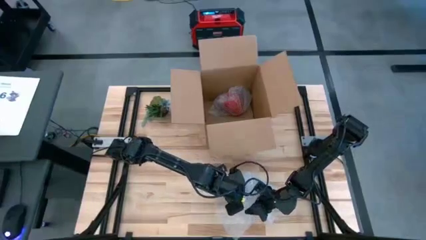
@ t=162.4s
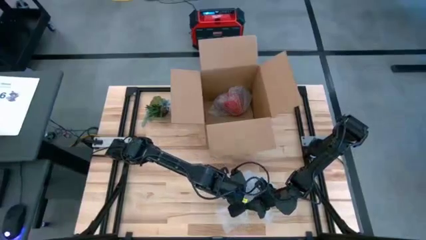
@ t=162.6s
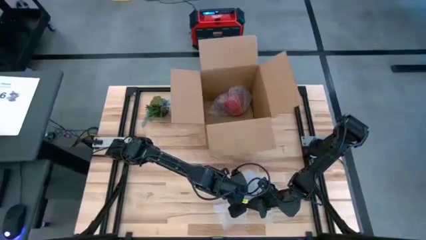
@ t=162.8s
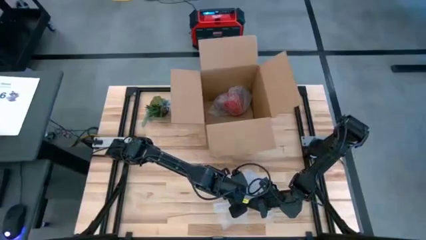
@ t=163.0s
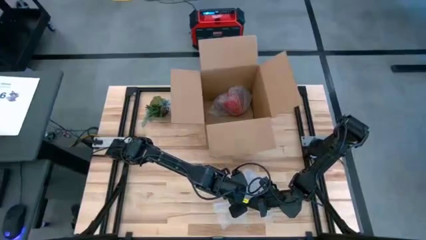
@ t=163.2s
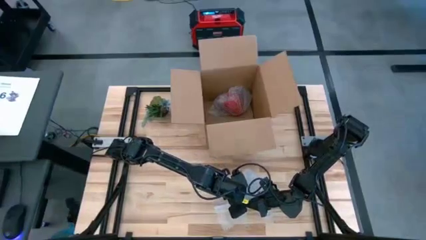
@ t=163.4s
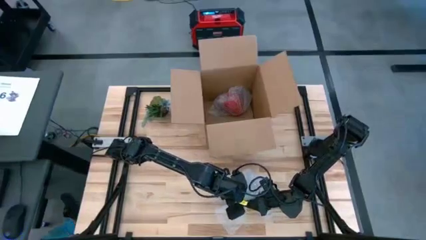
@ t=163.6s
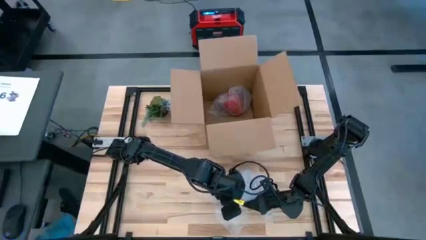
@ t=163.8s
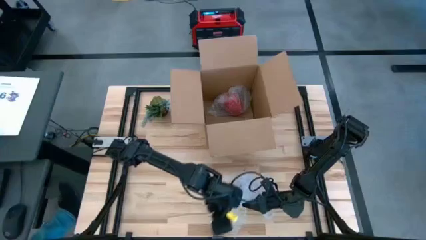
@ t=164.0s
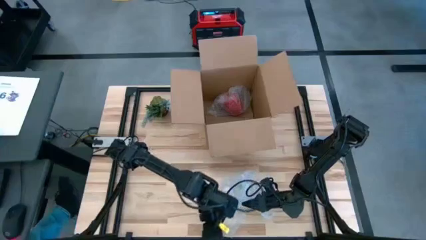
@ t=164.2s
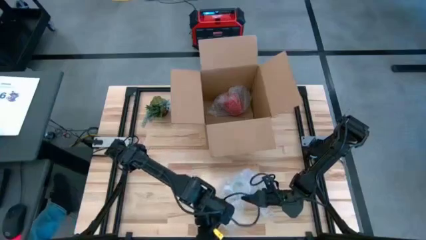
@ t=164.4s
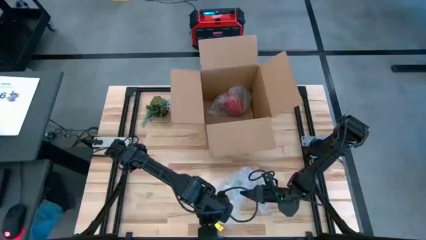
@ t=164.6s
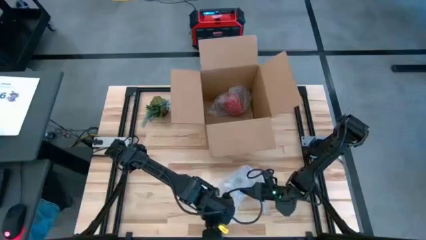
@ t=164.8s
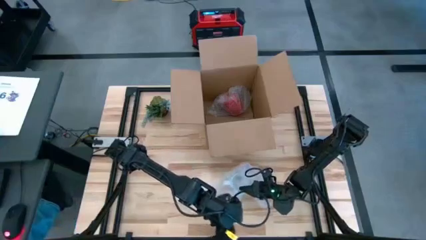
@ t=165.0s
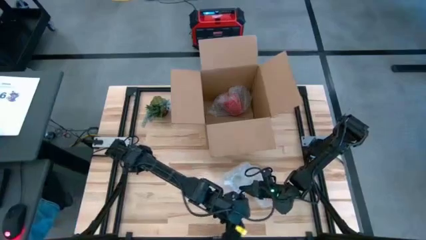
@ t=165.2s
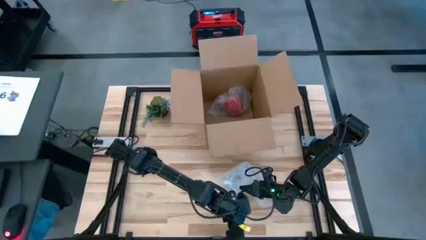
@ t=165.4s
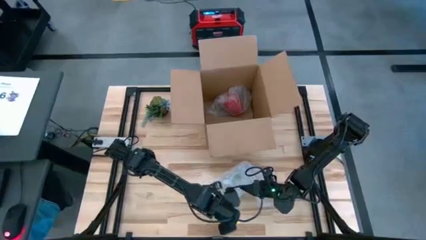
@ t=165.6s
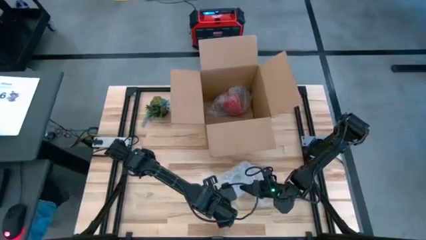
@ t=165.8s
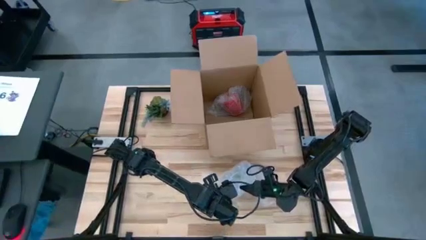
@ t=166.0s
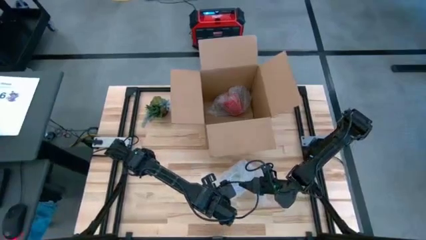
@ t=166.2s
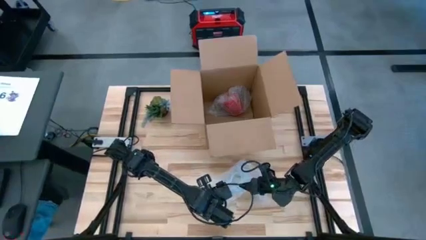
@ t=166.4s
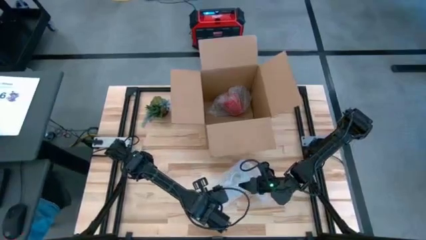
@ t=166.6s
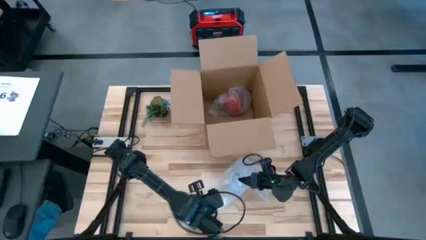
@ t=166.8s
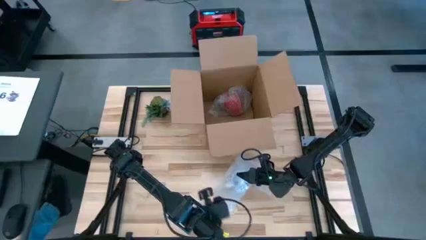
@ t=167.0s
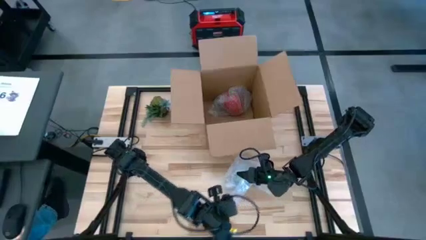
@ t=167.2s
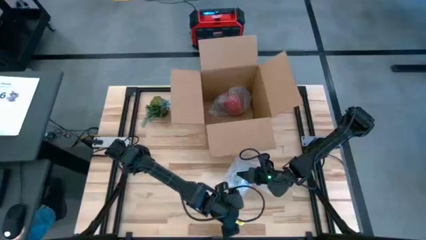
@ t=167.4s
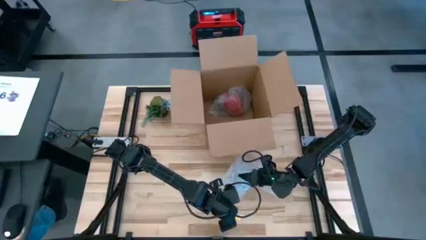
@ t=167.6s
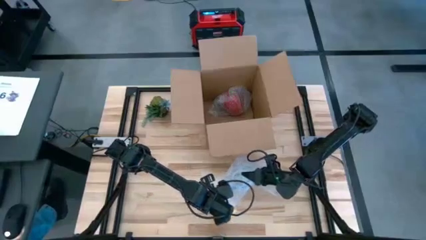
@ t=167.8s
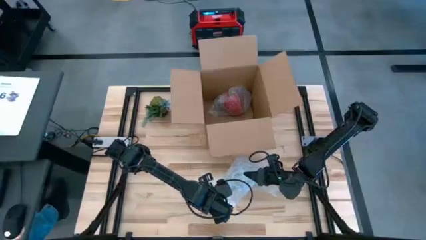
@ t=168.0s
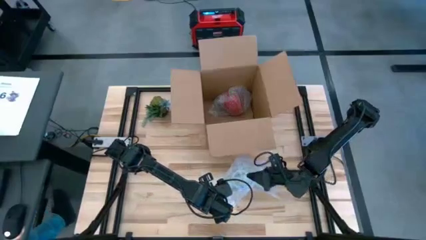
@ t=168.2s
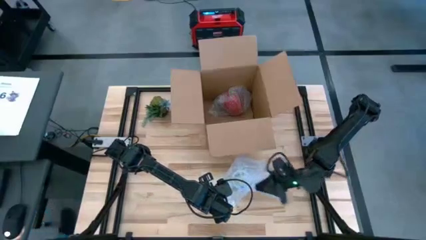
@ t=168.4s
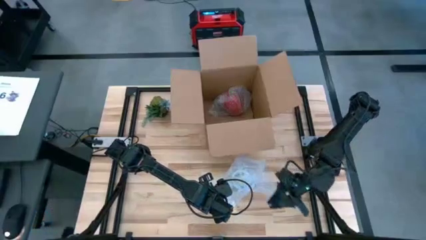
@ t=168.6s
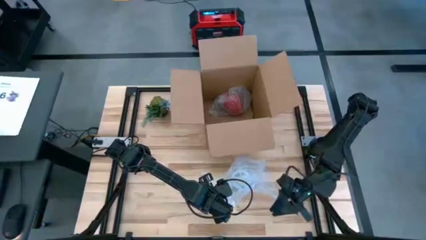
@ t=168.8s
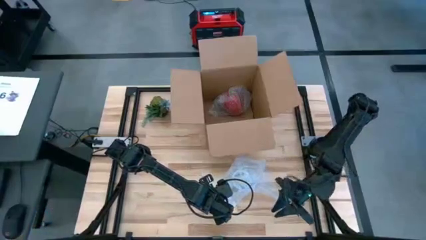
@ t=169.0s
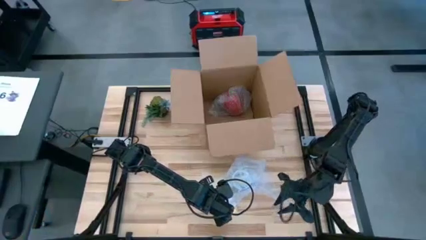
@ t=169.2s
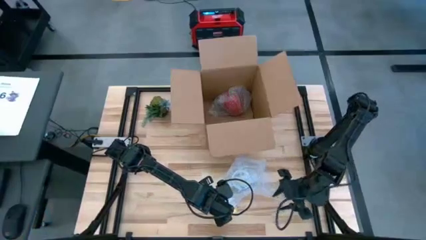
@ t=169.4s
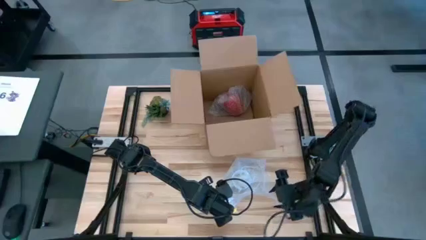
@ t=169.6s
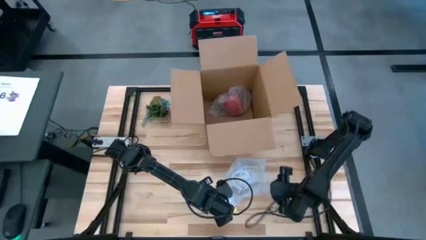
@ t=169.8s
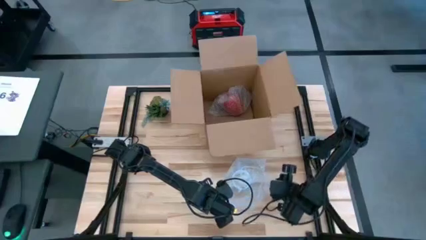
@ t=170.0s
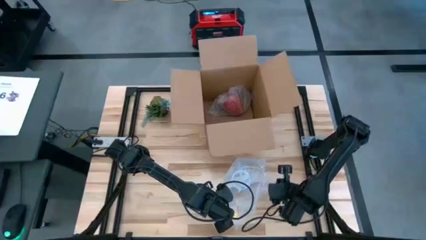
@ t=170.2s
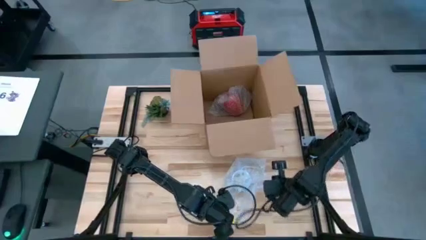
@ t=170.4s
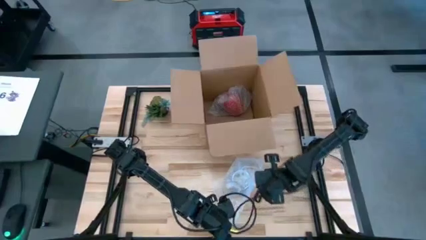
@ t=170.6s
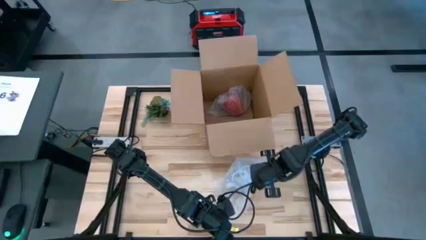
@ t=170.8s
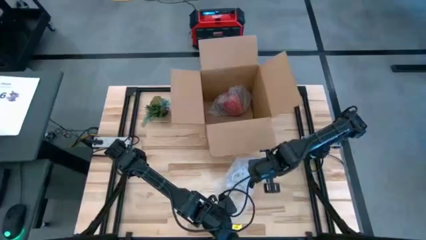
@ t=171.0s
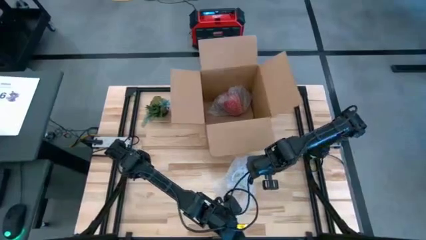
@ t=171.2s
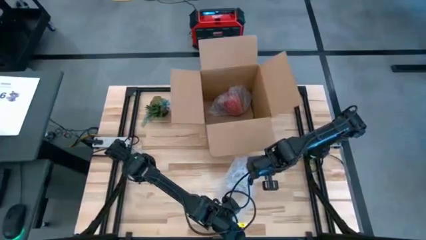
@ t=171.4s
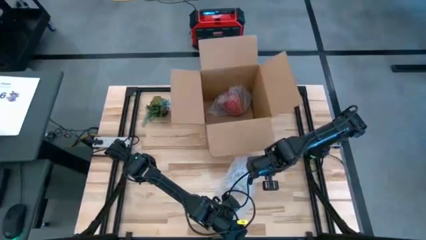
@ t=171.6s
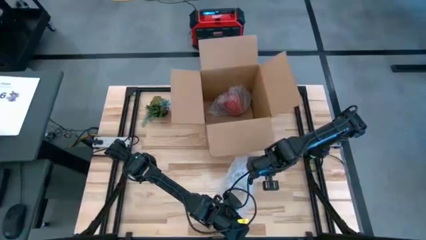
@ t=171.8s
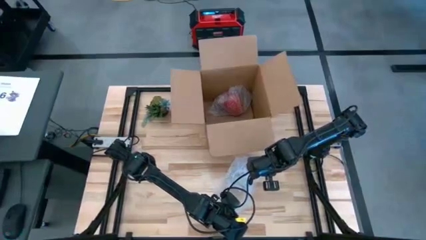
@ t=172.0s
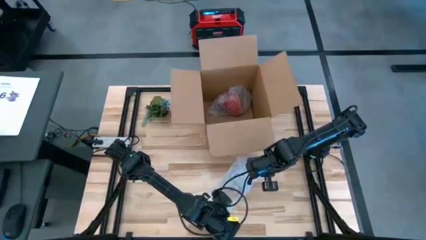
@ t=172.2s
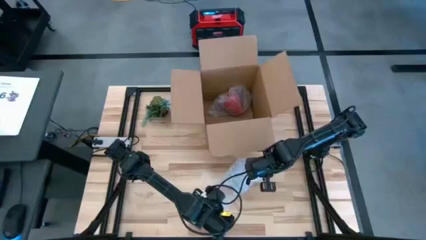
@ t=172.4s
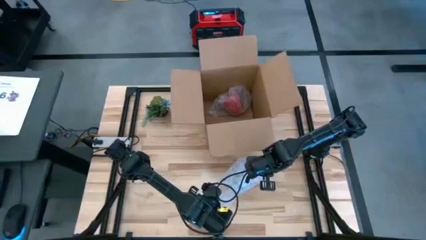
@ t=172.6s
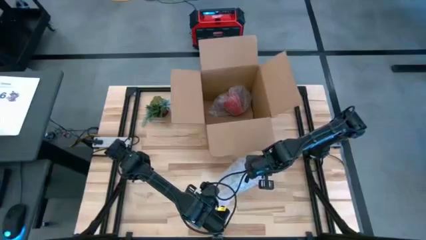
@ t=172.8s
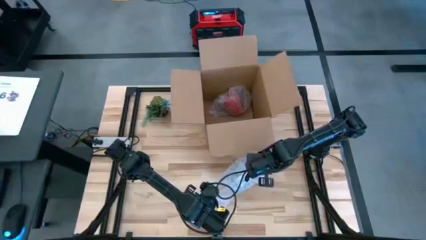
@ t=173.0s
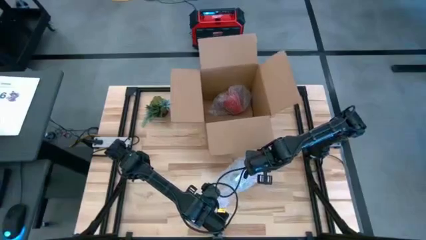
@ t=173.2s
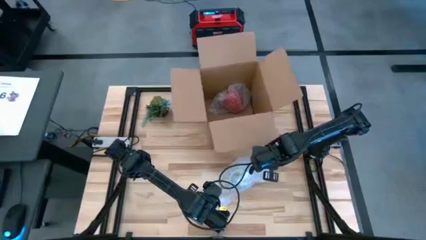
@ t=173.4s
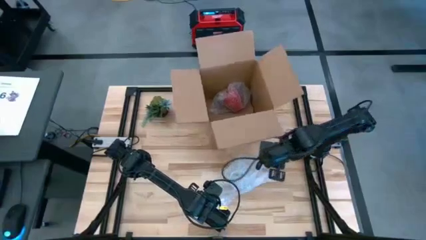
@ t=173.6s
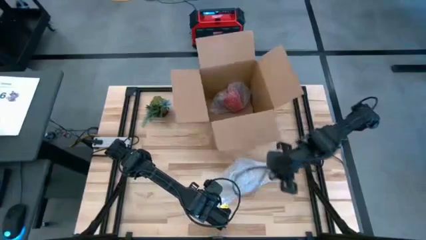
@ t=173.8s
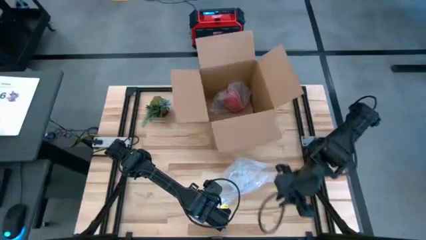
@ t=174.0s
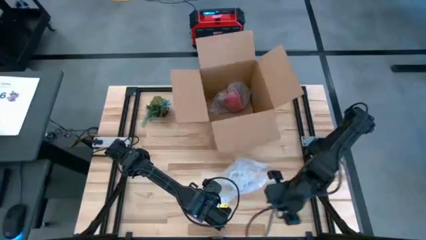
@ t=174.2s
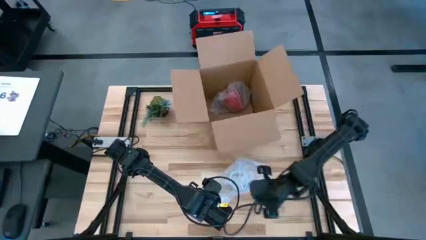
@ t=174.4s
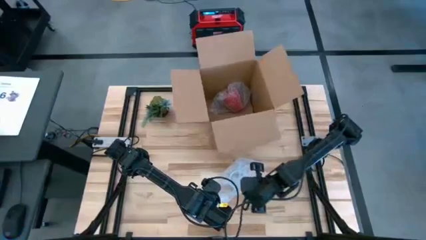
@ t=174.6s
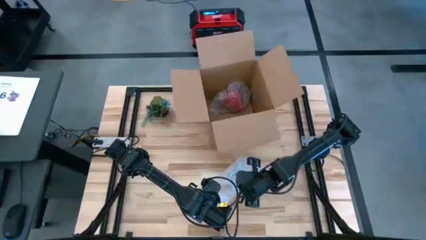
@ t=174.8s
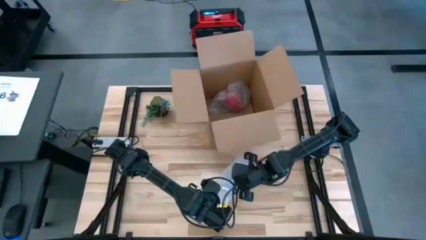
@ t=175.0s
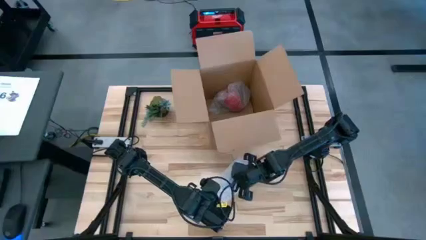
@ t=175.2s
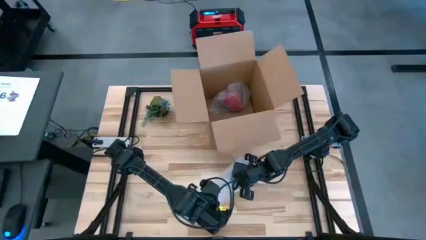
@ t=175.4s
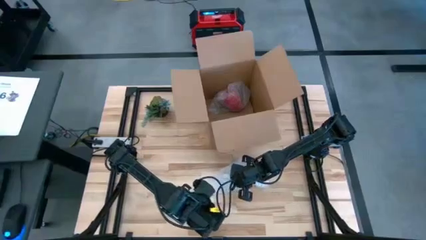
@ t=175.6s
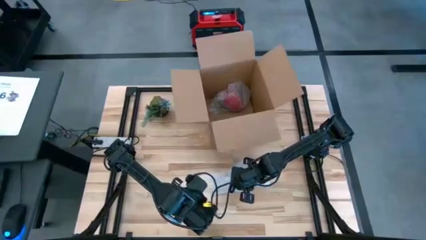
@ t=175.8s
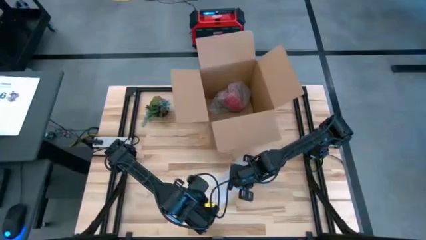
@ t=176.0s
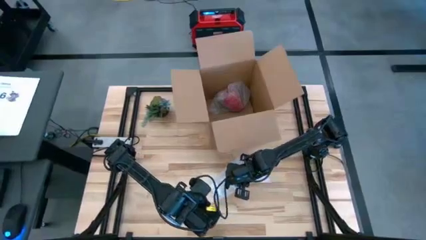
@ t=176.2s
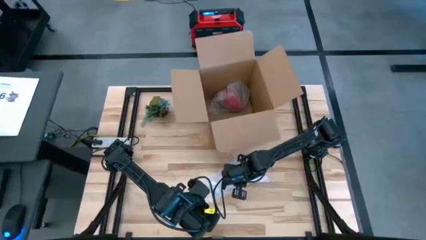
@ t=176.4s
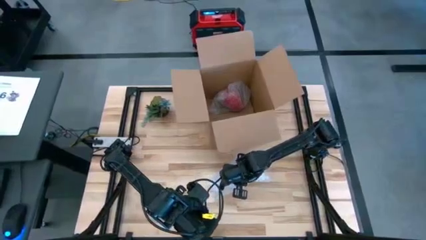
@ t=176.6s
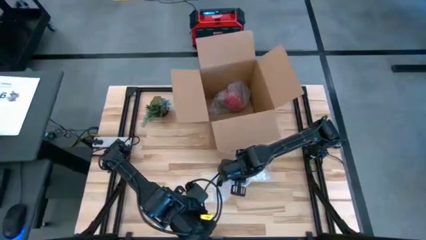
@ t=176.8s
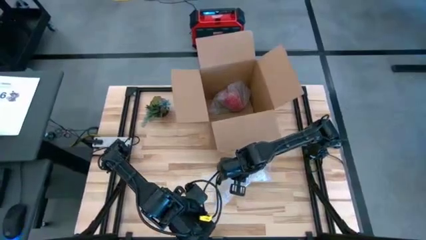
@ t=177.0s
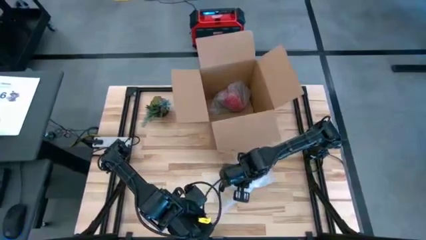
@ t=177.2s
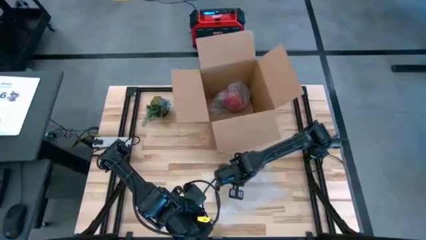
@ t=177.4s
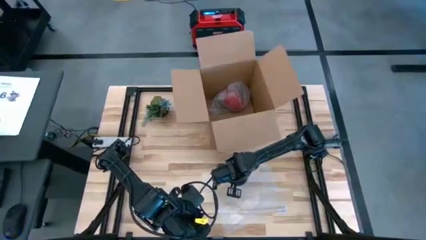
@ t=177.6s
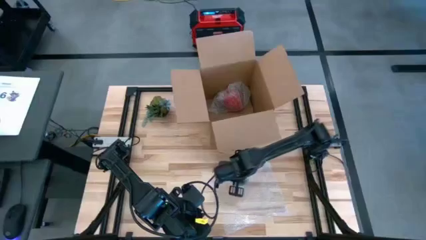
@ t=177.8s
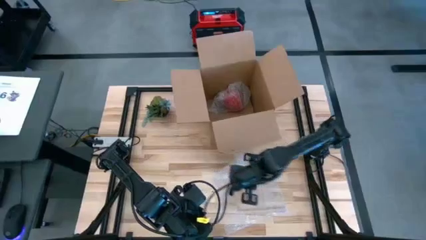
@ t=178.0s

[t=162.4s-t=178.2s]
Task: wrap mug
Wrap the white mug with bubble wrap
